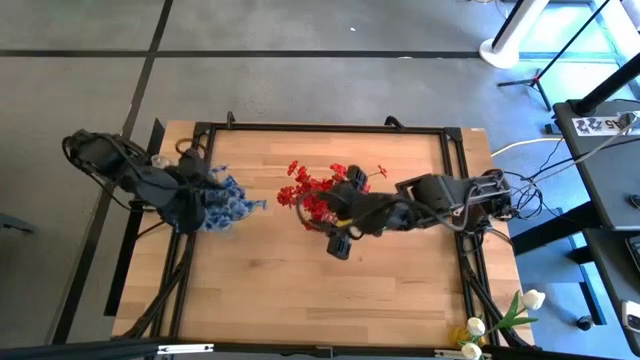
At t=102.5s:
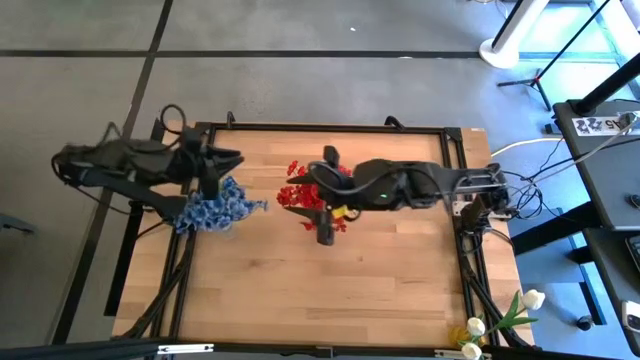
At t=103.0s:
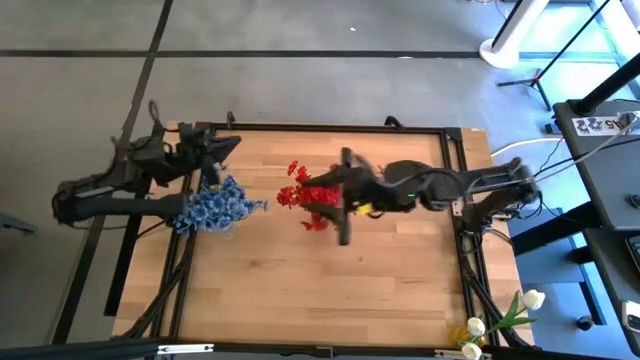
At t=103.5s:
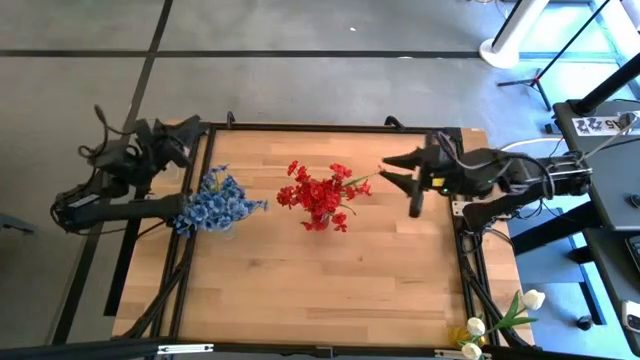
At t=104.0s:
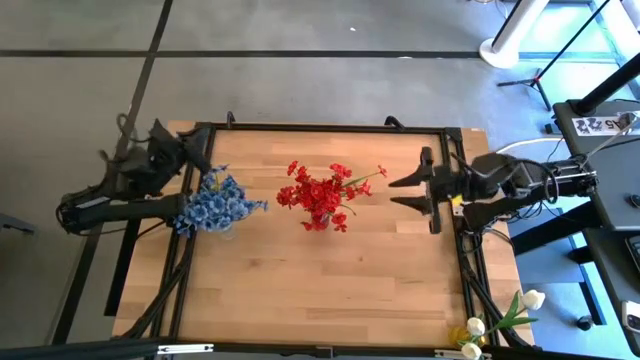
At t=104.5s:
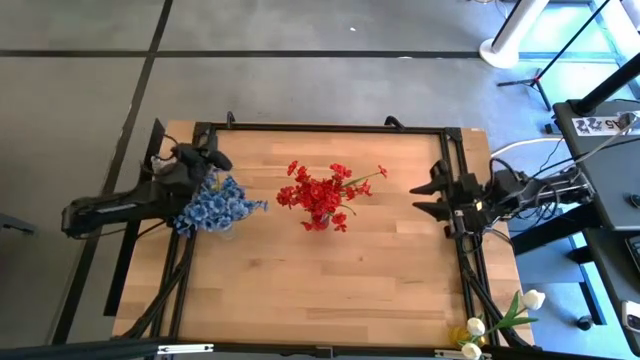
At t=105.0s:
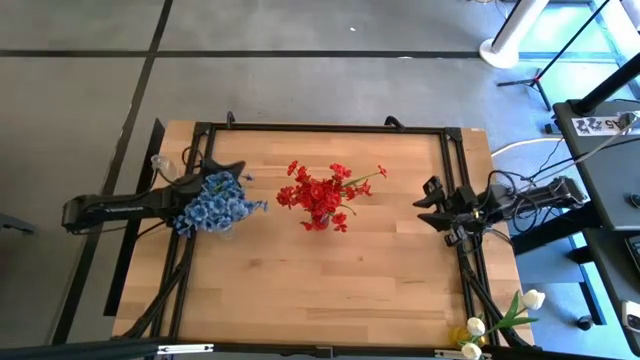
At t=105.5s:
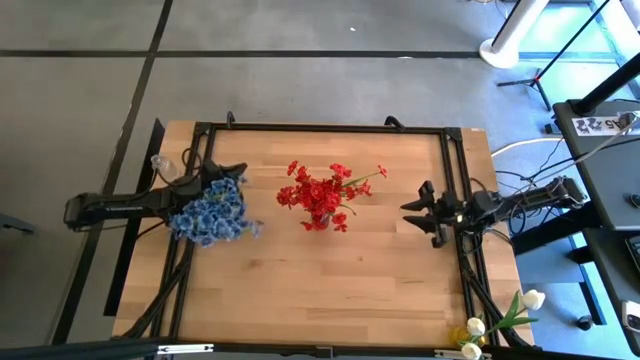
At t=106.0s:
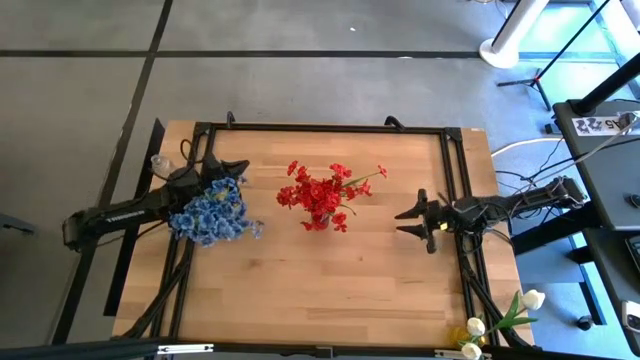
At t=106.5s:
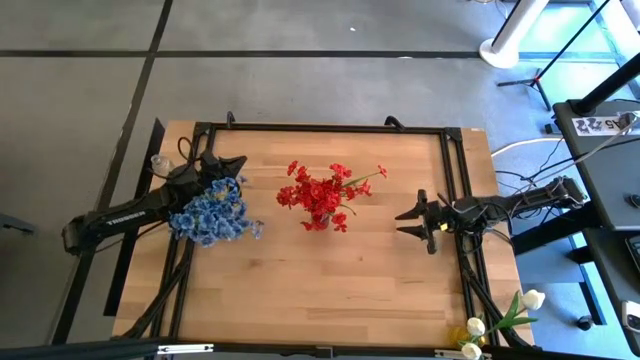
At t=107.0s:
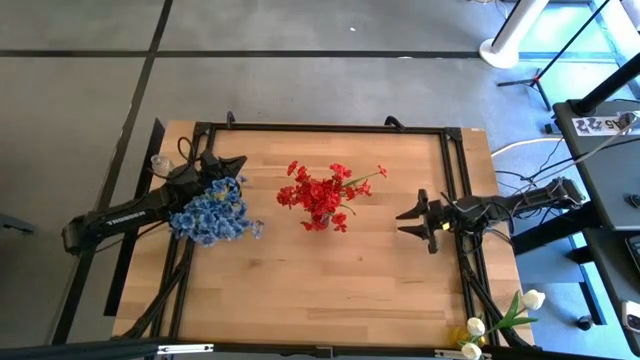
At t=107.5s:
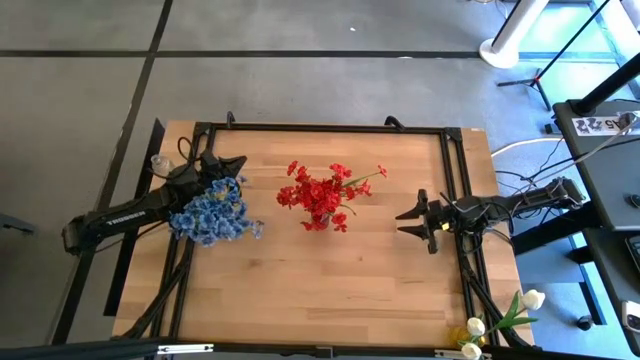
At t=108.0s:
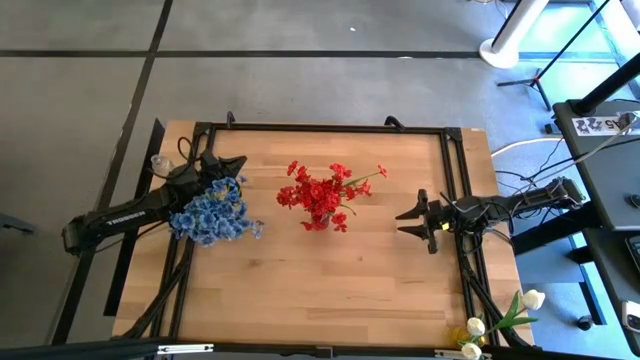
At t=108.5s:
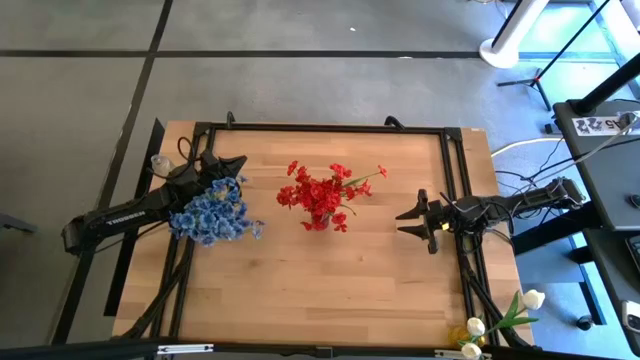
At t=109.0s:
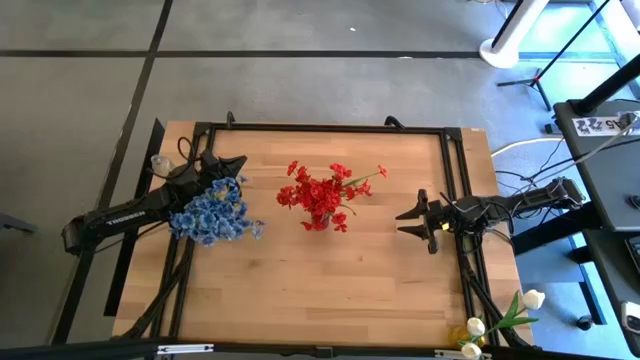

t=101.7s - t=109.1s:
Task: Sort flowers into vase by color
Return to Home Position

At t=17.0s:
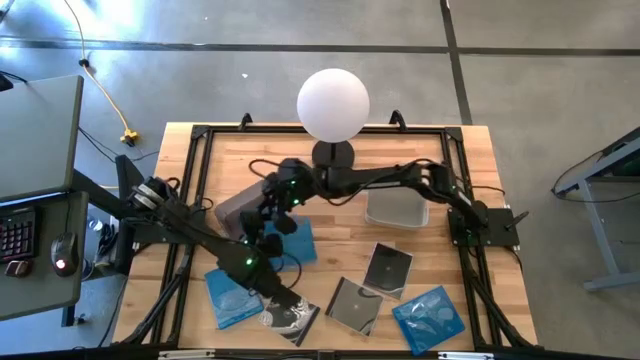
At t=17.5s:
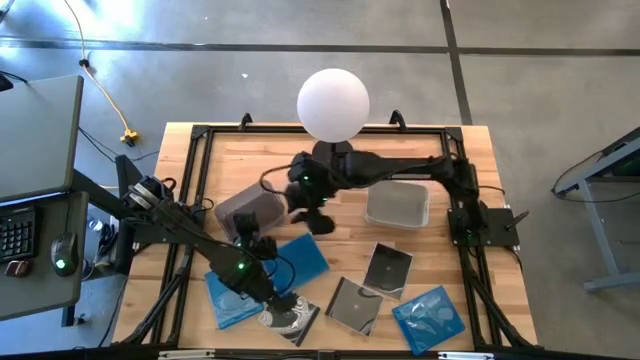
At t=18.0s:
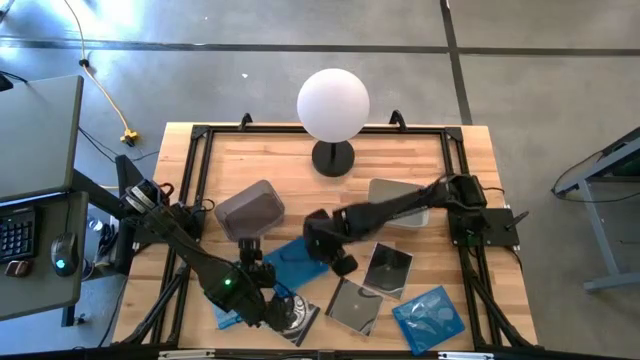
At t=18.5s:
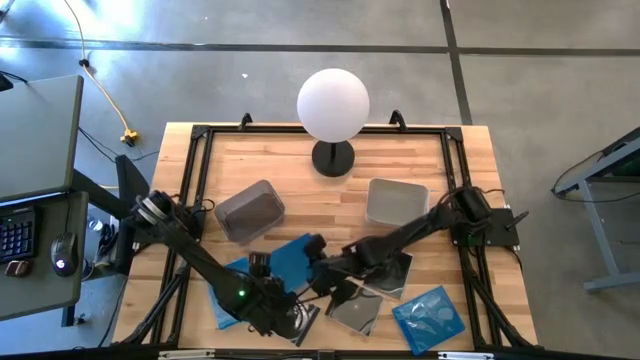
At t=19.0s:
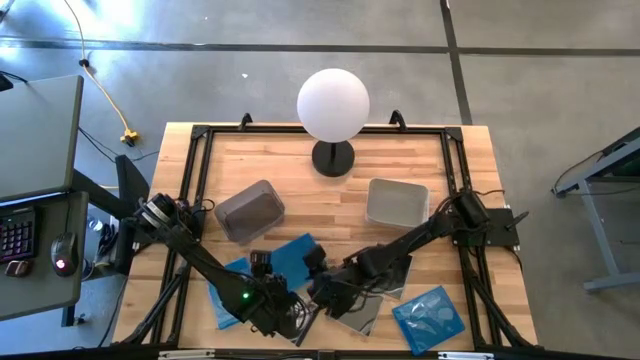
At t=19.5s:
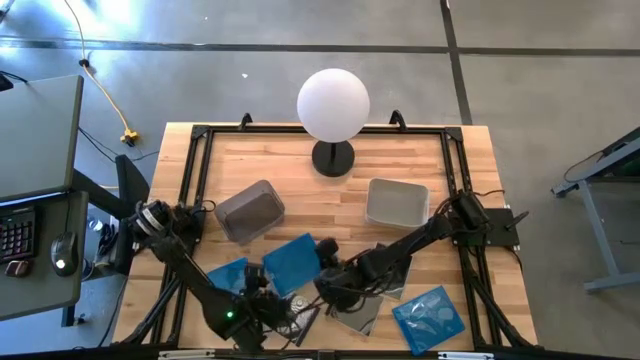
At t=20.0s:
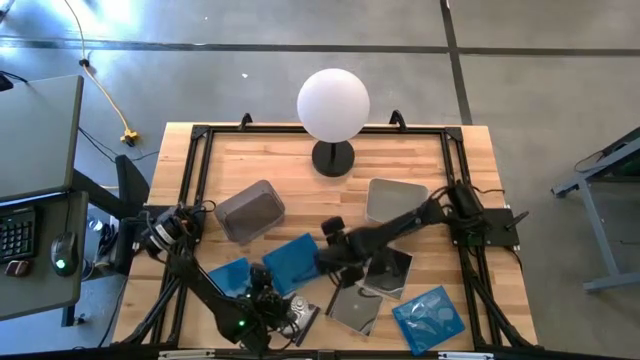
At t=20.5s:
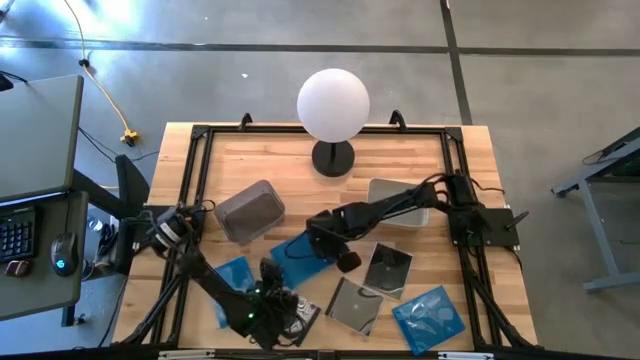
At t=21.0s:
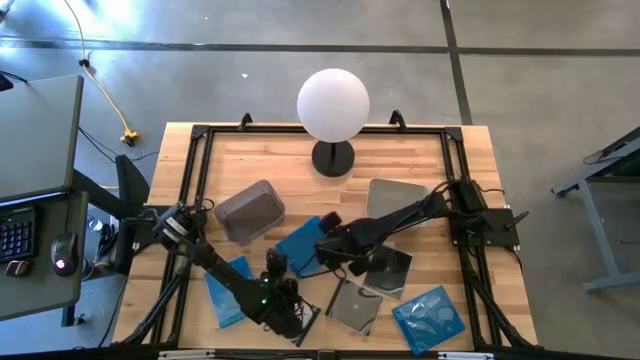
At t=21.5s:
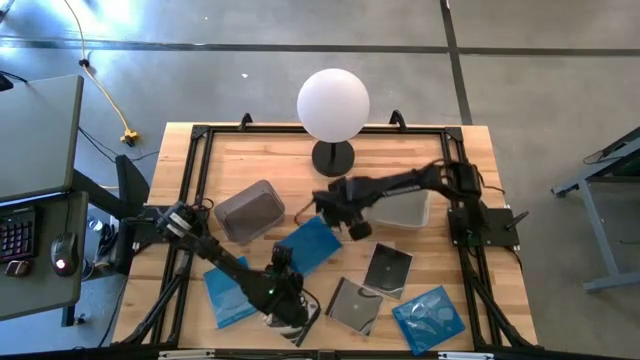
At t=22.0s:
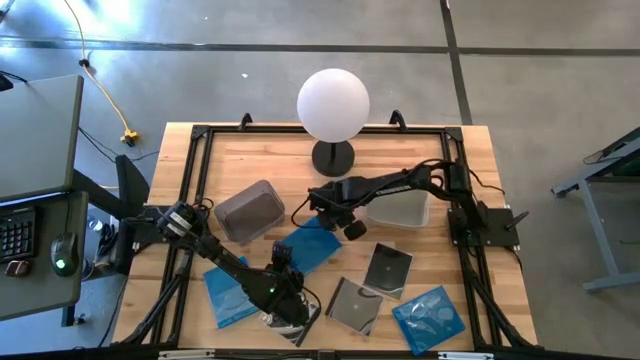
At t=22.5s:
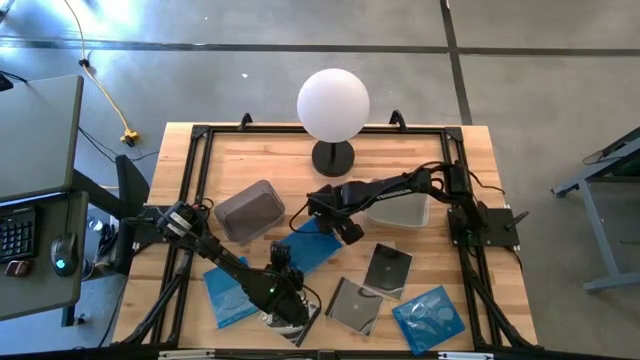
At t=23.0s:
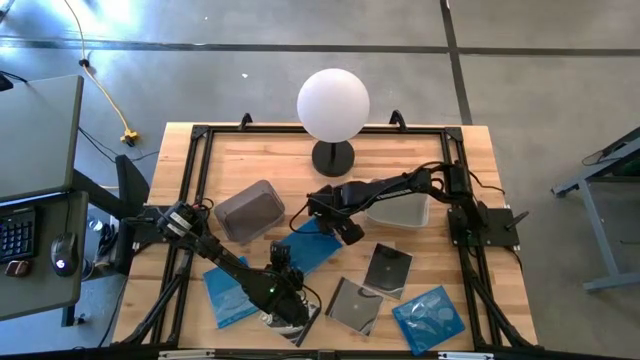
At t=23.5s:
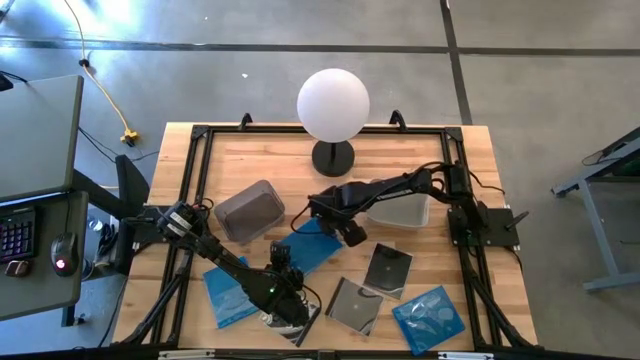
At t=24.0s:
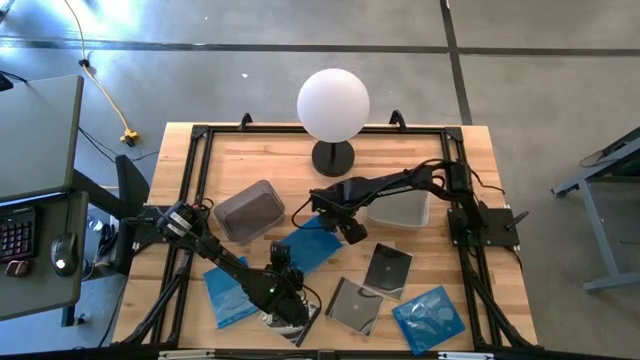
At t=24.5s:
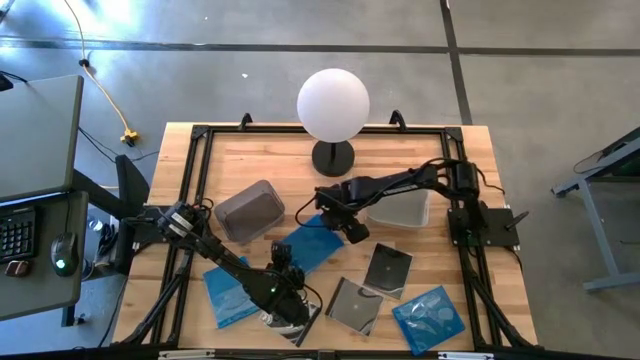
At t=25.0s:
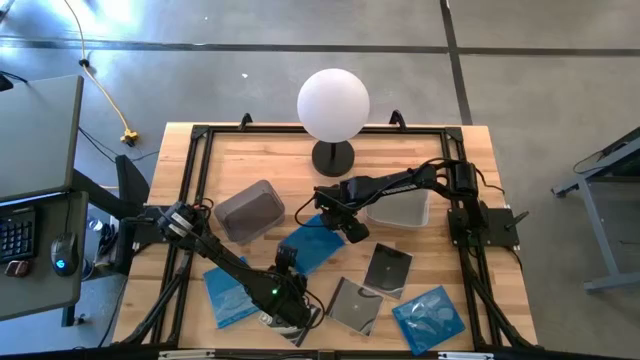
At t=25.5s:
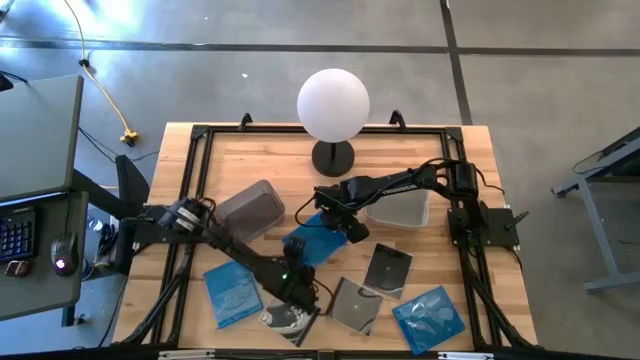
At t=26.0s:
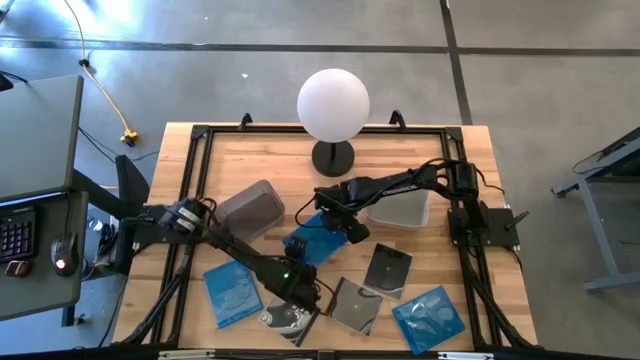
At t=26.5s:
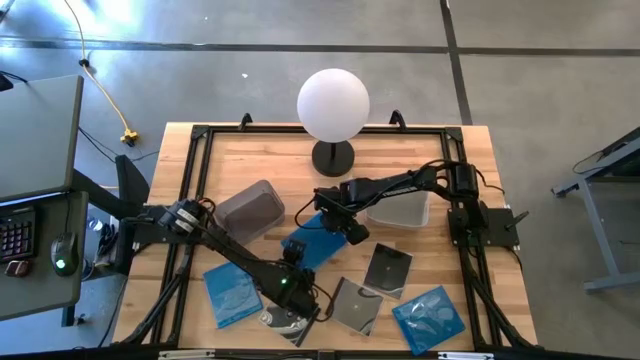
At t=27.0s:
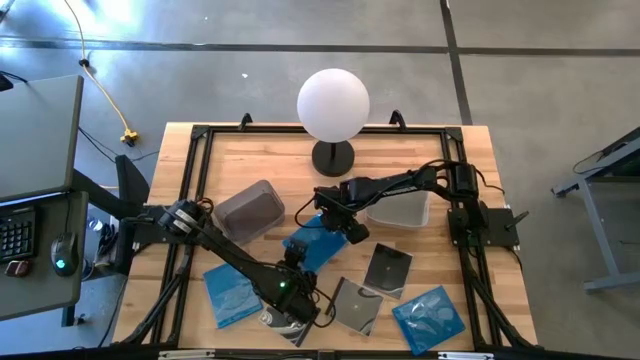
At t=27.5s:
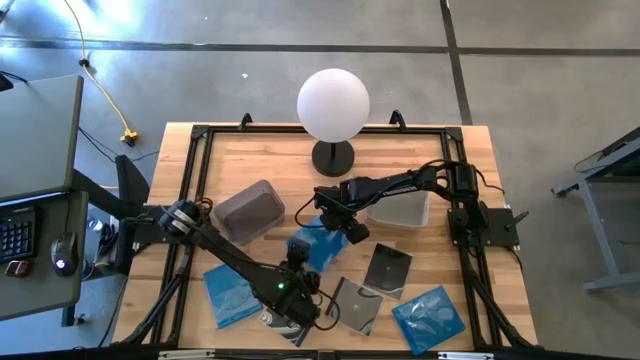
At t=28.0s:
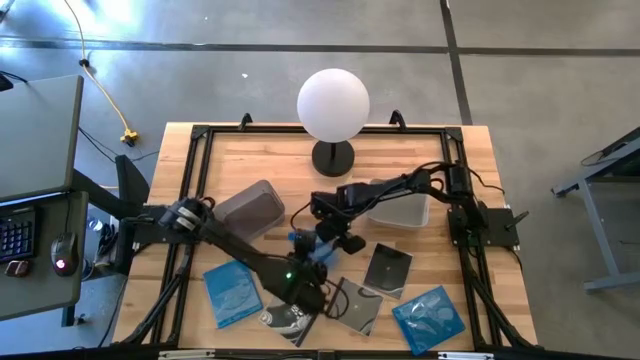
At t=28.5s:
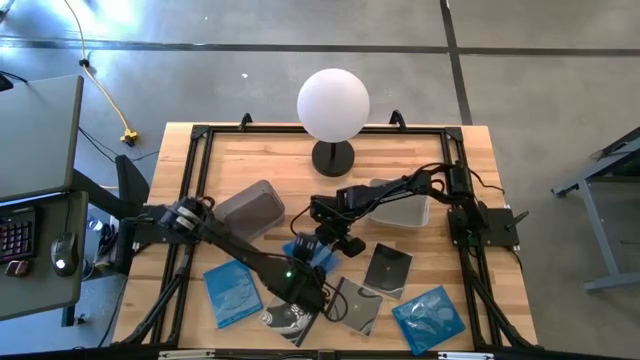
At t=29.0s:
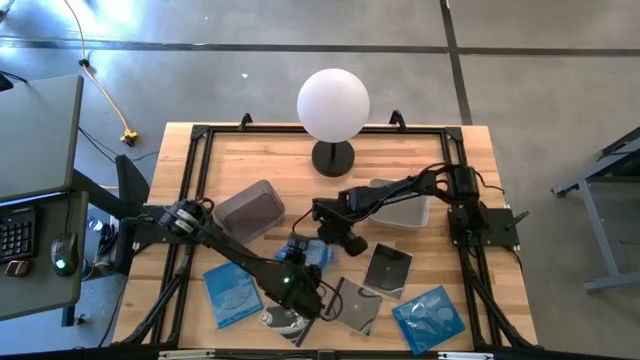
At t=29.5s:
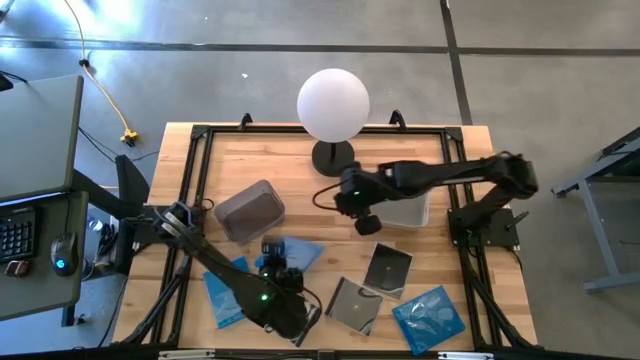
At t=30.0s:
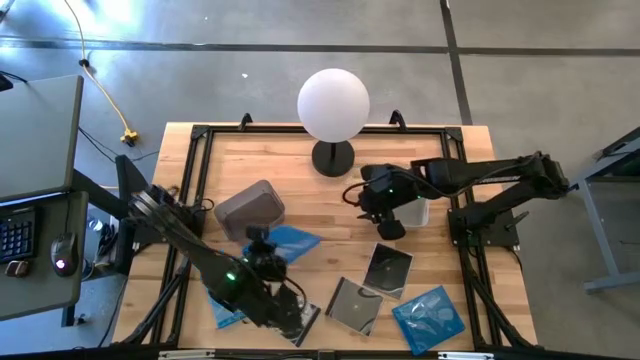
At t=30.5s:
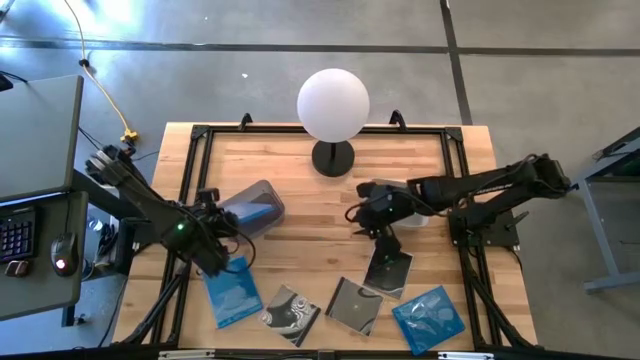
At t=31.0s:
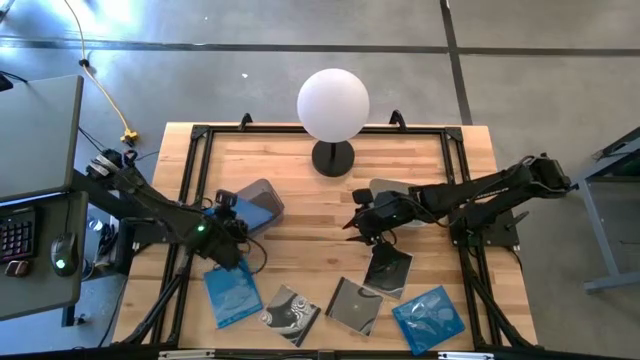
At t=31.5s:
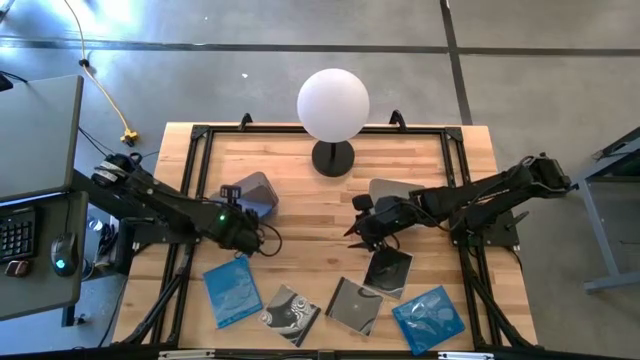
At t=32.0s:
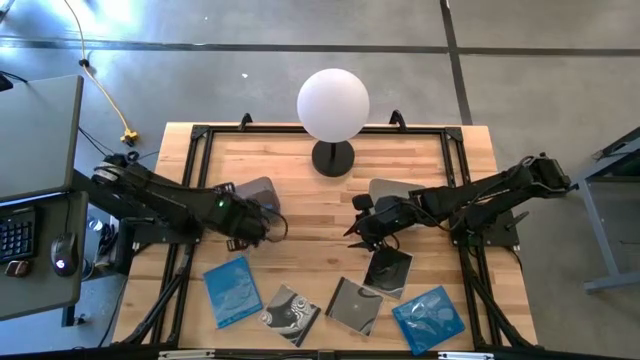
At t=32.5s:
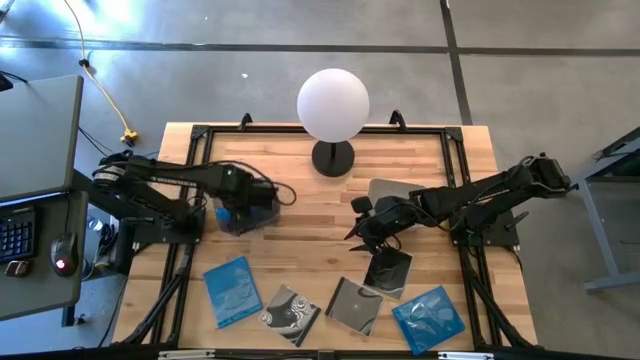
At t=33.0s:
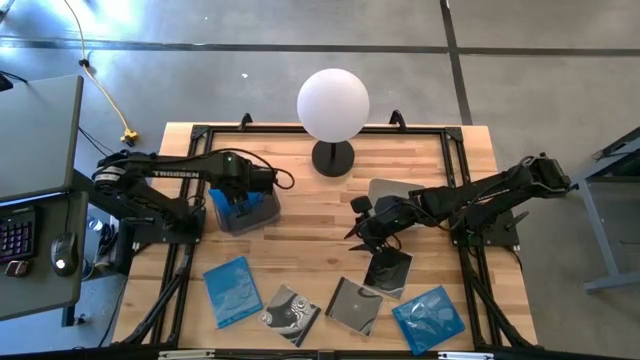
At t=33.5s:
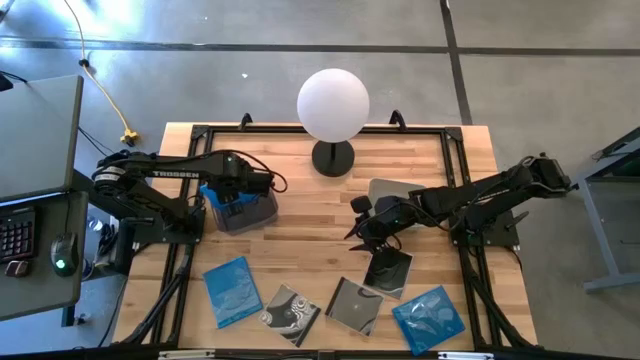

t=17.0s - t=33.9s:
Task: Pick & place jewel cases by type
Put the top blue cd case into the black bin
